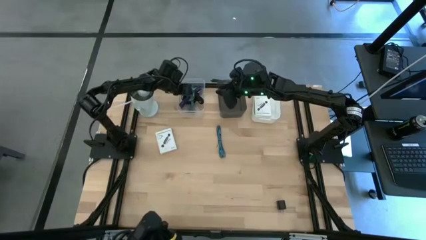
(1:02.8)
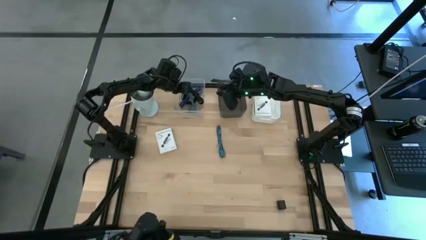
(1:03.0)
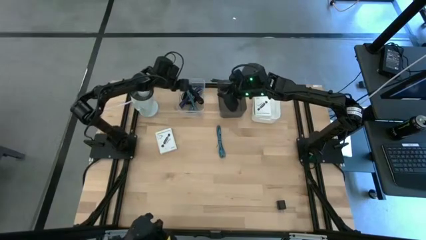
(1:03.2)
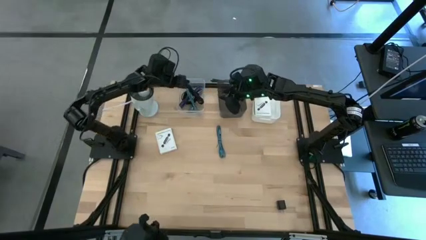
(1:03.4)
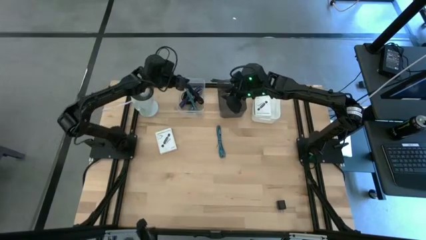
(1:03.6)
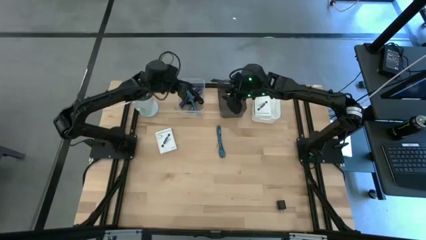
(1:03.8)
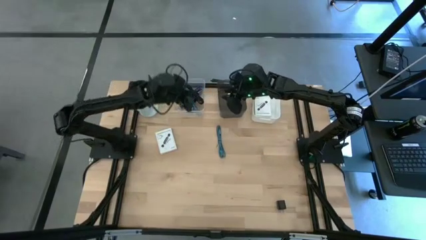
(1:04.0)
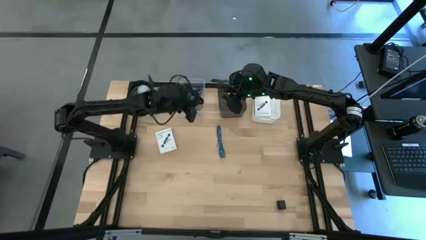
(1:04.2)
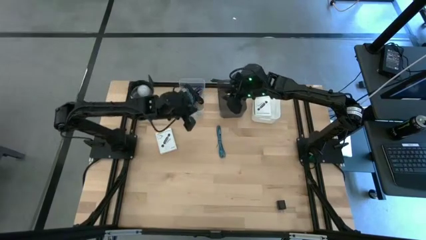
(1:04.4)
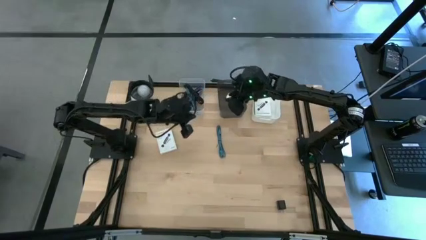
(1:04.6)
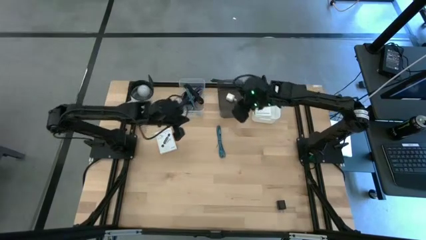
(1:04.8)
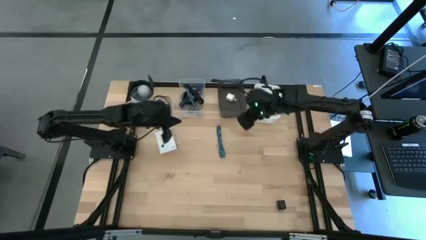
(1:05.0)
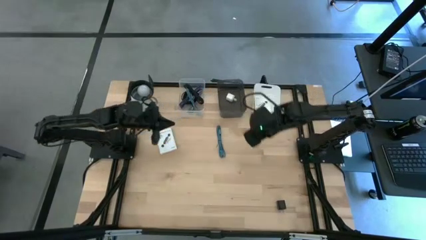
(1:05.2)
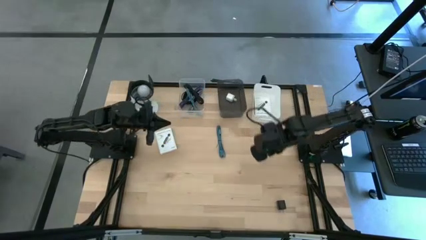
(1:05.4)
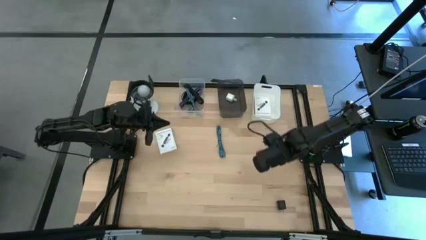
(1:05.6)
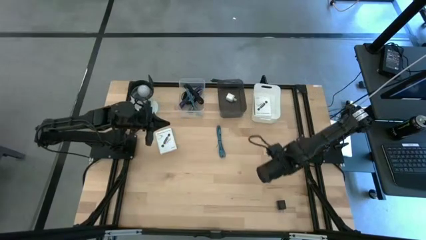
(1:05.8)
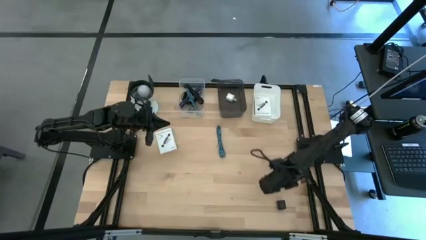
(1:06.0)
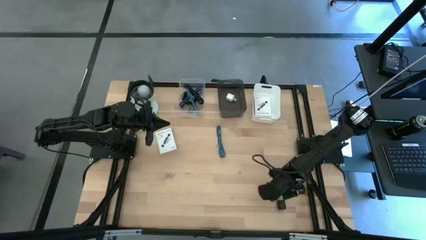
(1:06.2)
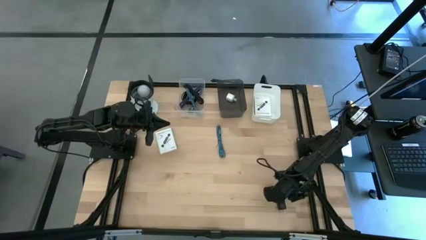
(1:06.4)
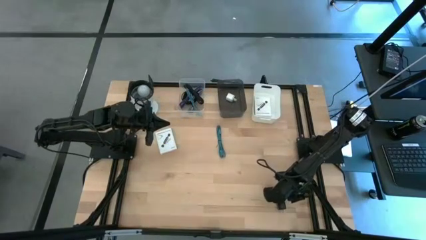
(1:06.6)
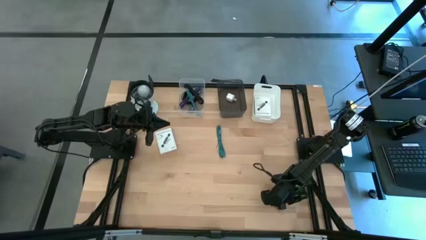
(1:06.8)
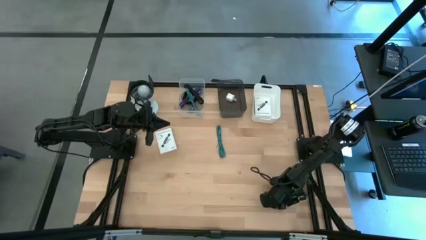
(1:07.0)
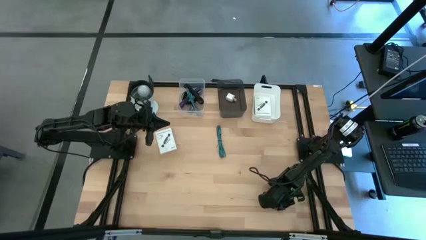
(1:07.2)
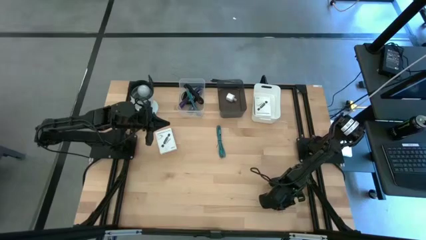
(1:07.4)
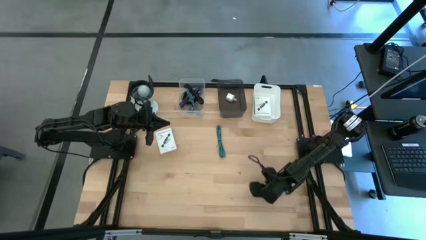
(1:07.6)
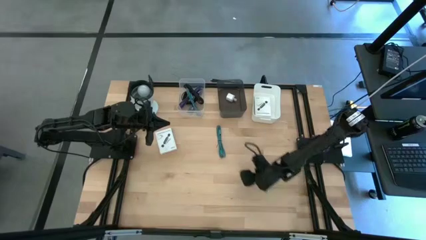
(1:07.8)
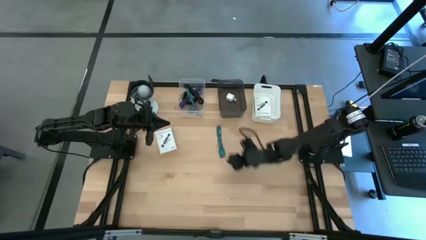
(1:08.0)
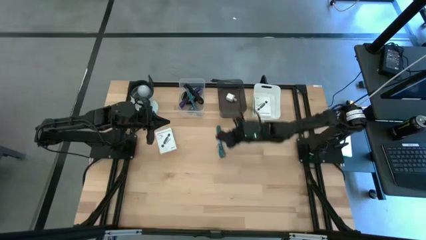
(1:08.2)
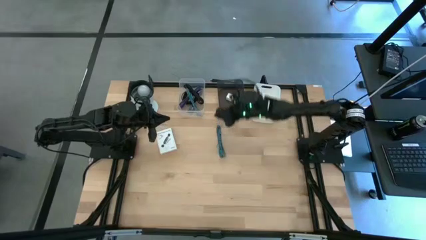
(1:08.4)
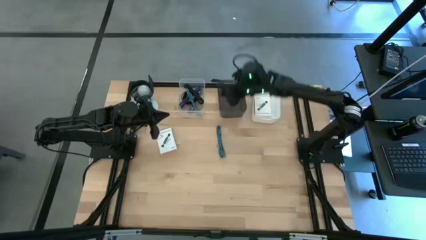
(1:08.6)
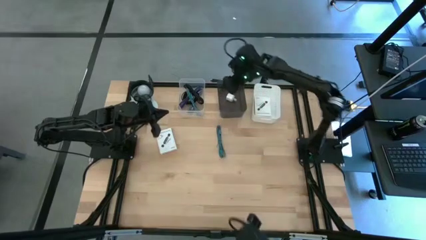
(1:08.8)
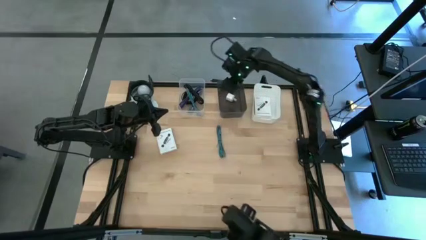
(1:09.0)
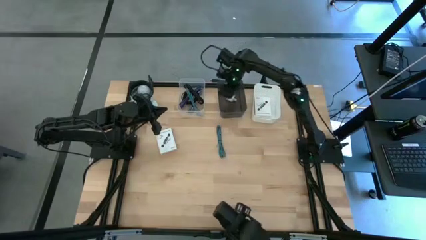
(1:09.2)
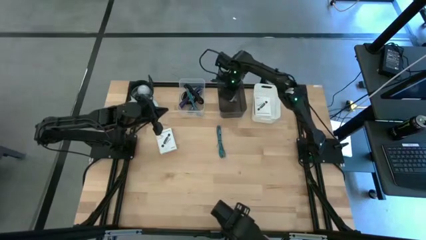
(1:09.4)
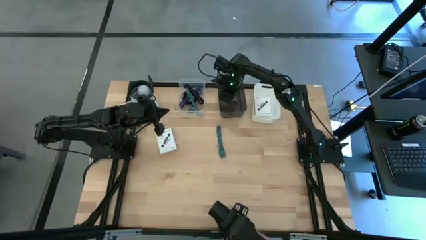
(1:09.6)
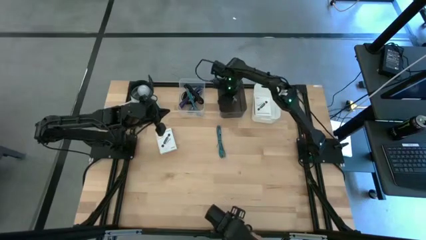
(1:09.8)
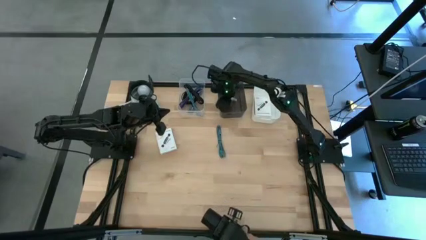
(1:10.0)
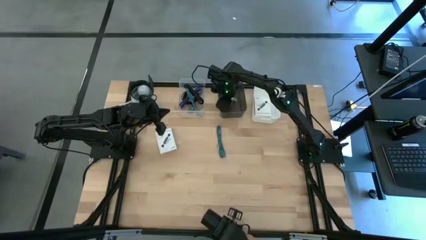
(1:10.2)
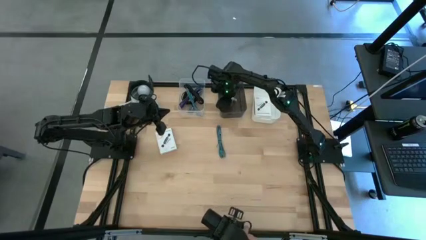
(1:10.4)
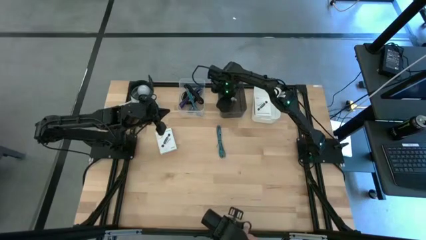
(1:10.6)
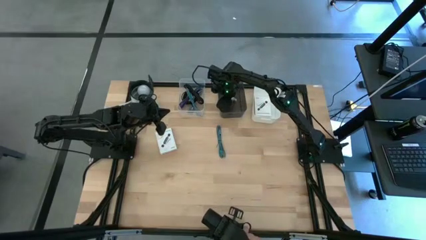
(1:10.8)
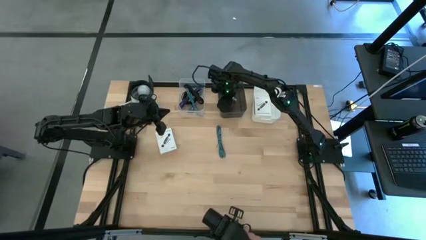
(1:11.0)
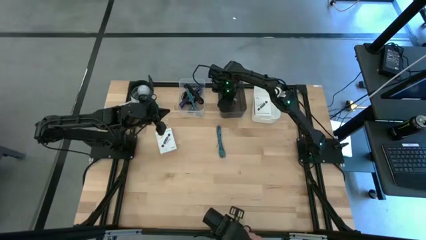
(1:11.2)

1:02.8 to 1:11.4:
Task: Pick and place items into bin
Put the black charger adapter into the black bin

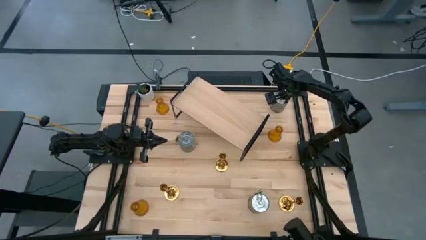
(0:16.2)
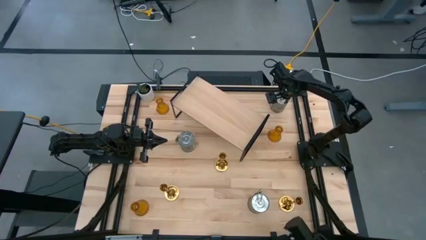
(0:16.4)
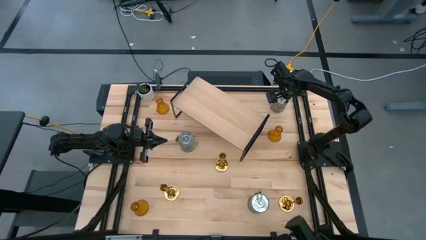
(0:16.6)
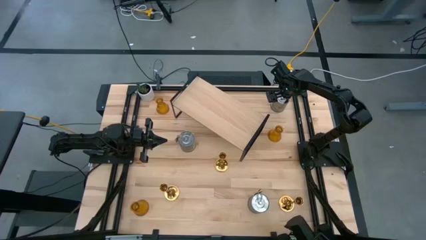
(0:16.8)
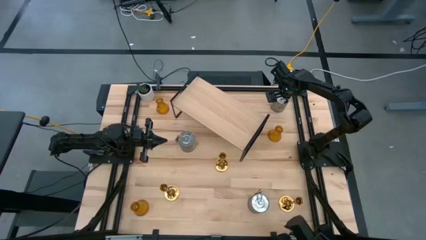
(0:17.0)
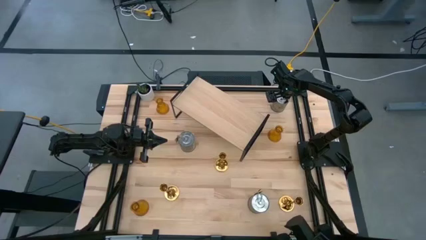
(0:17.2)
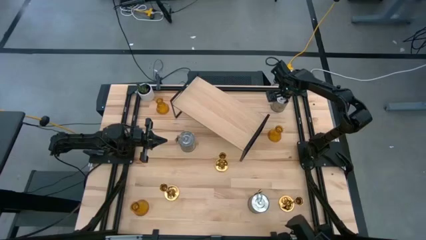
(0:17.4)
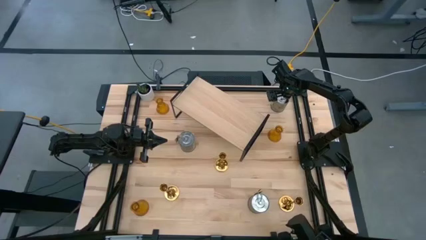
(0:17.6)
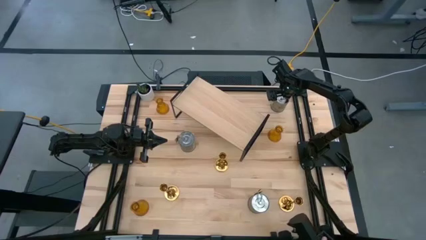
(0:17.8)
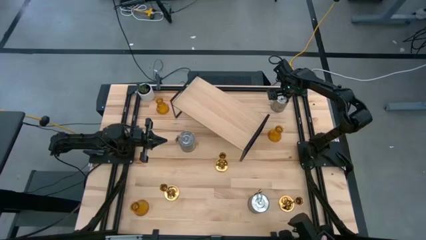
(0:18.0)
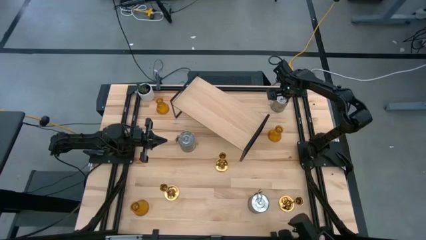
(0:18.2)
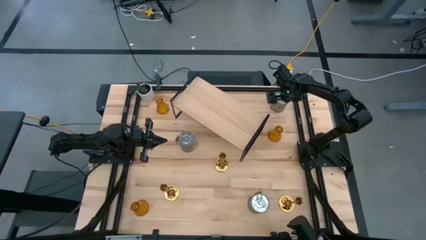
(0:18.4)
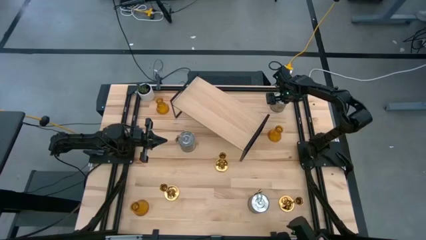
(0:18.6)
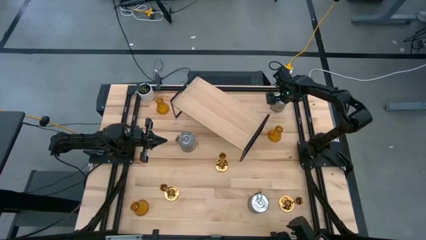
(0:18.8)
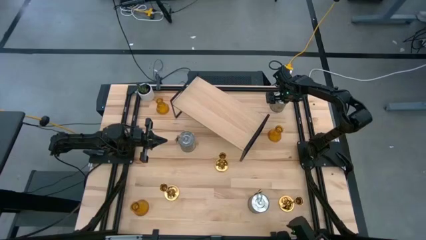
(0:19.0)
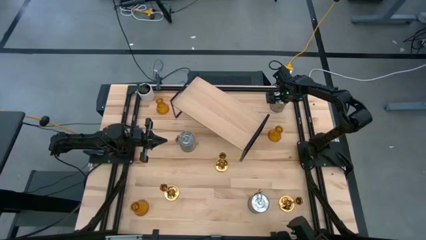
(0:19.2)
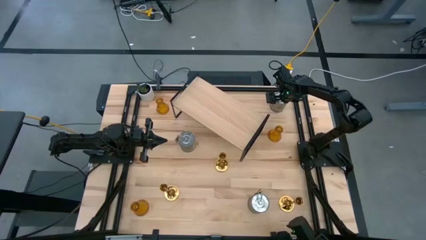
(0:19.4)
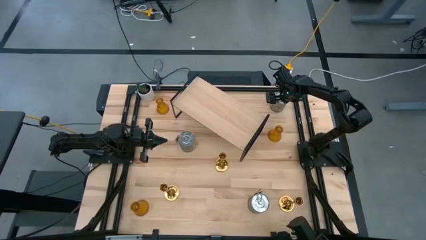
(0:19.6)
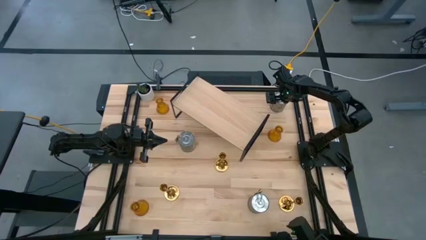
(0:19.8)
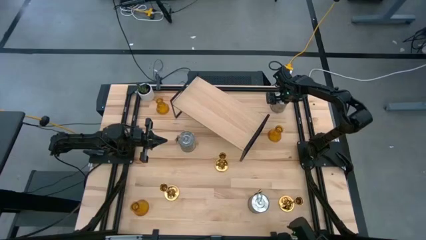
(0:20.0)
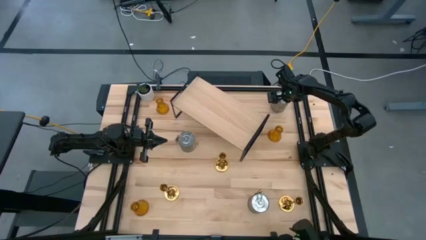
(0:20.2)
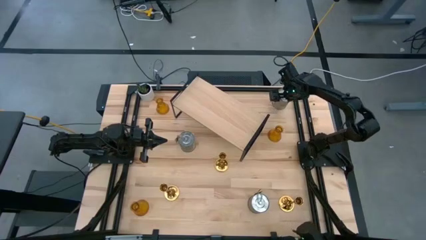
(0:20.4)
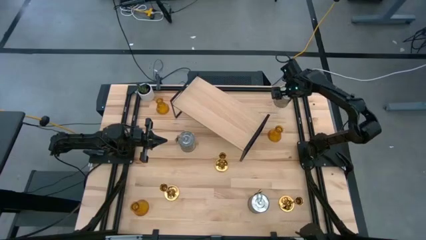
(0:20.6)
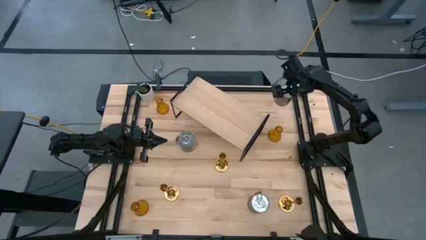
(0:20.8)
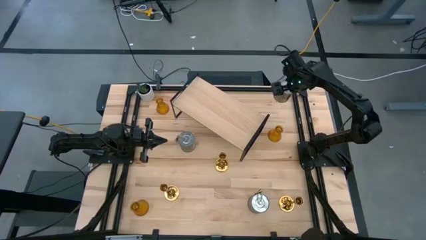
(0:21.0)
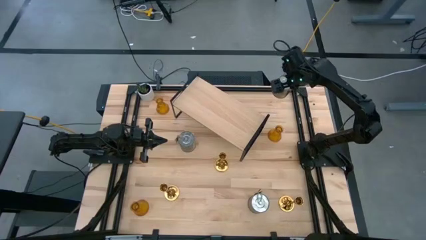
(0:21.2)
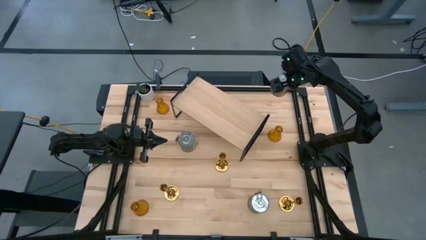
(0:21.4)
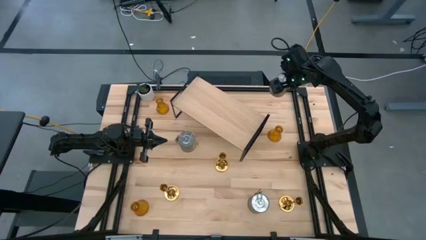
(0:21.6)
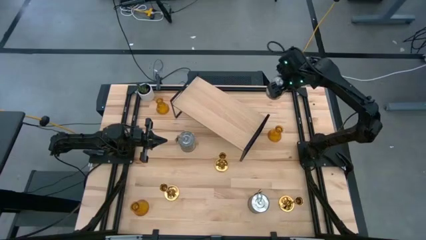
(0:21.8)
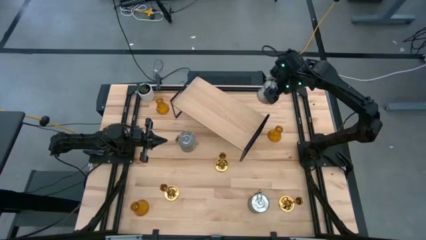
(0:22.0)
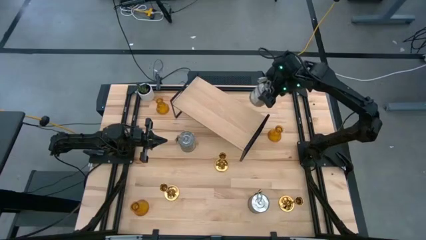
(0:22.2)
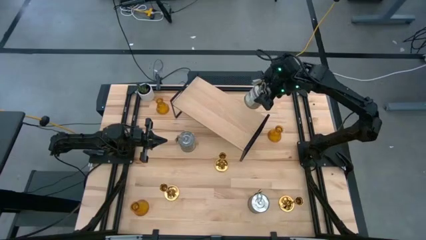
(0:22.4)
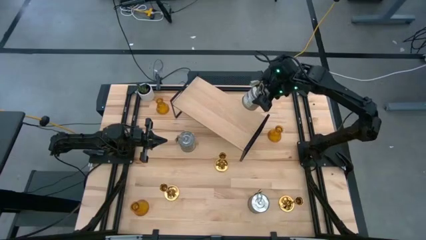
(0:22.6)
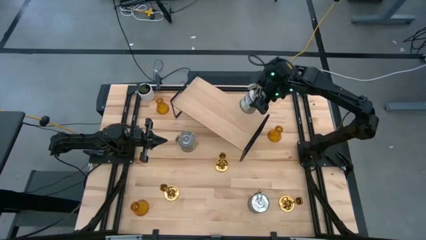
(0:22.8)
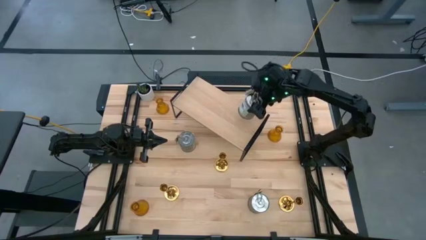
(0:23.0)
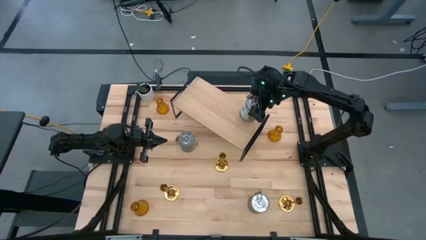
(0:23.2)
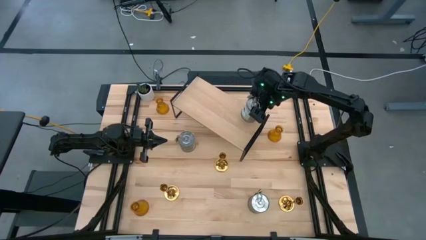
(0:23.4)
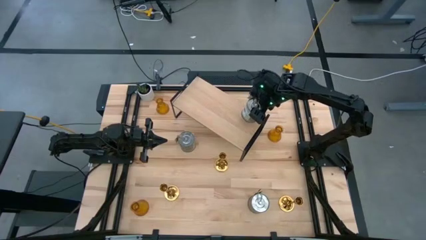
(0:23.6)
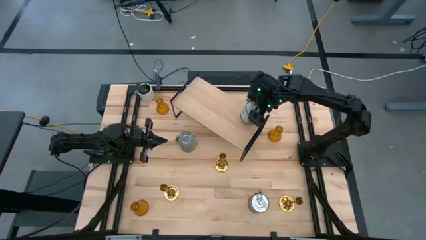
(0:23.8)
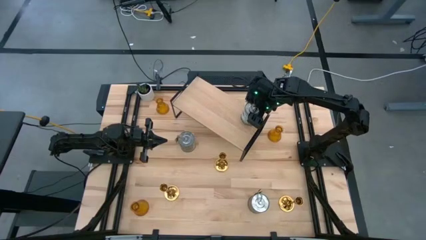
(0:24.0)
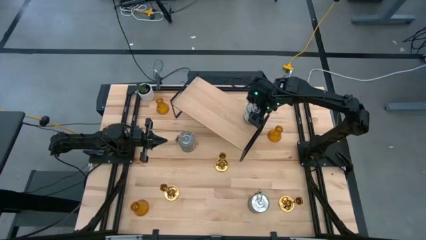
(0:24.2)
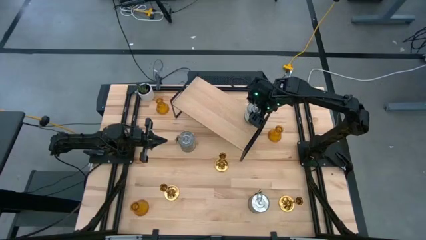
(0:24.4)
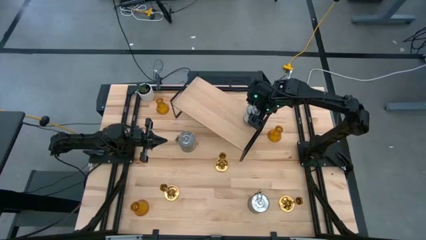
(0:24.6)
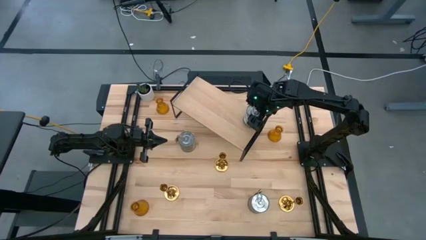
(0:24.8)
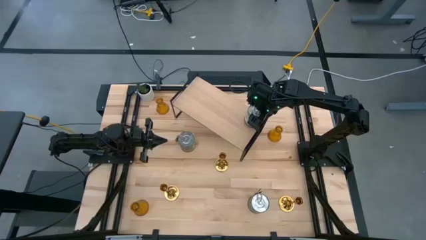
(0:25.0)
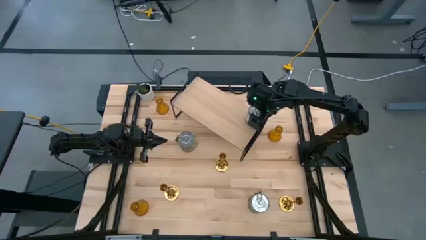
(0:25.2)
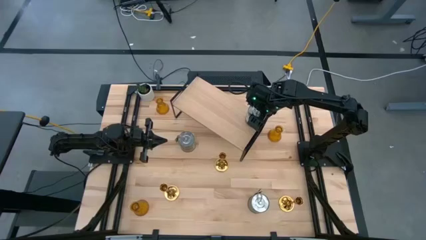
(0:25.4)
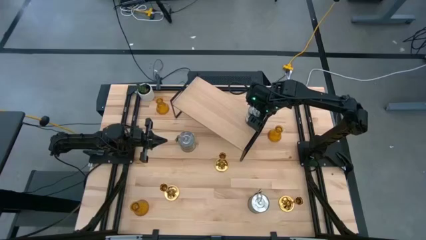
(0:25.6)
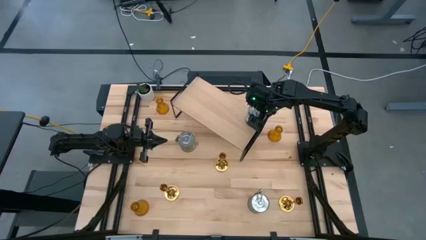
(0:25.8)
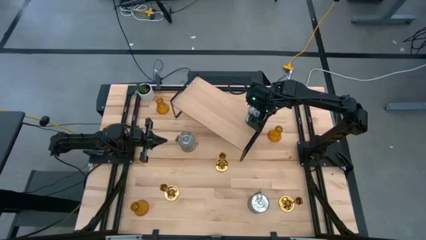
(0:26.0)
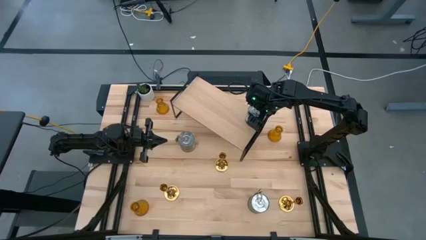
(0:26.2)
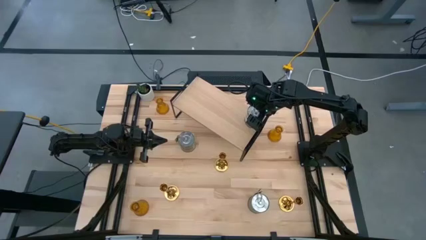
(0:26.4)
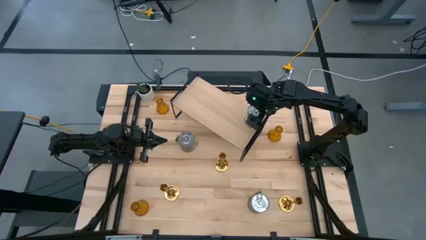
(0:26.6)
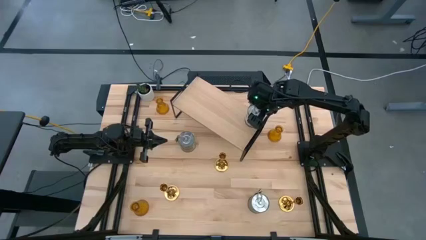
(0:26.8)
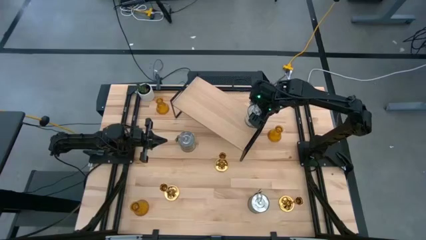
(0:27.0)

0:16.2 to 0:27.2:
Task: Pick & Place candle stick holders
Put the top right scented candle on the shelf
